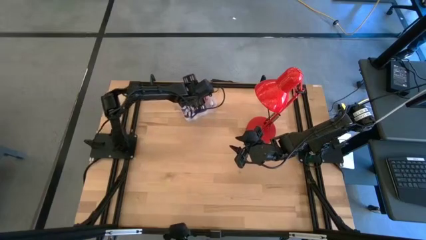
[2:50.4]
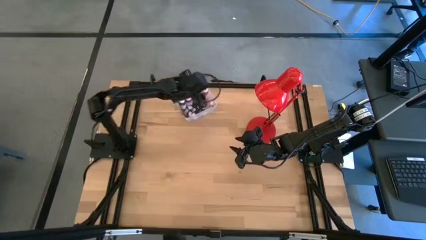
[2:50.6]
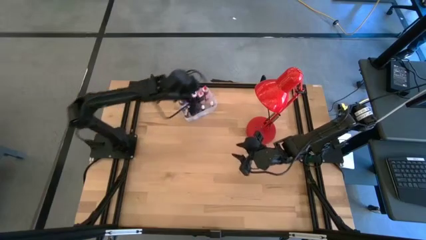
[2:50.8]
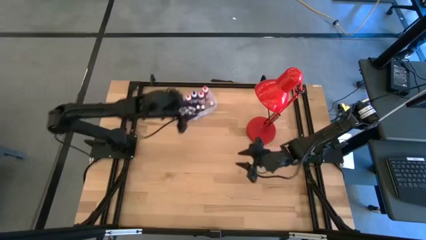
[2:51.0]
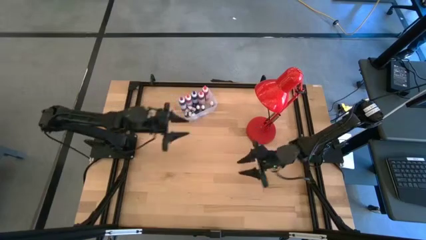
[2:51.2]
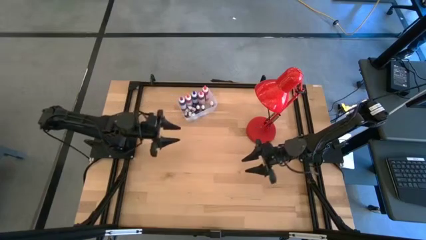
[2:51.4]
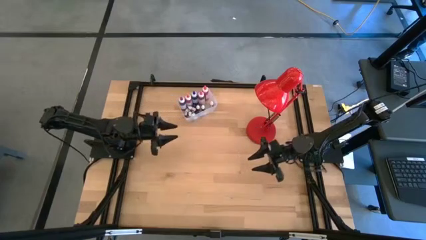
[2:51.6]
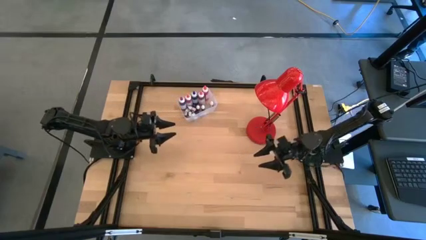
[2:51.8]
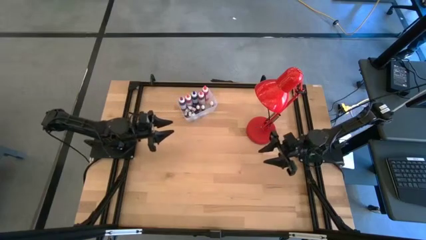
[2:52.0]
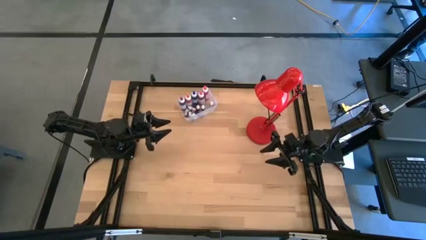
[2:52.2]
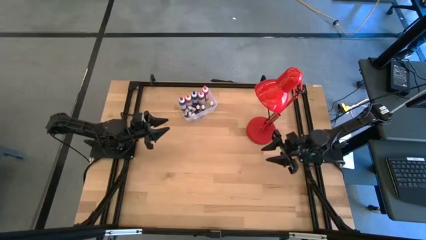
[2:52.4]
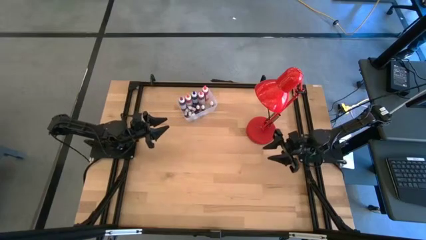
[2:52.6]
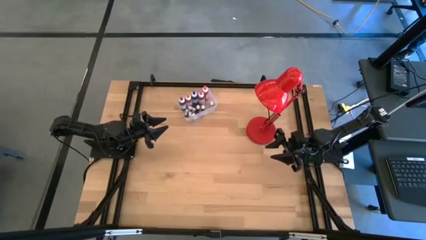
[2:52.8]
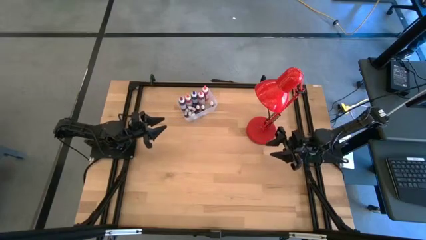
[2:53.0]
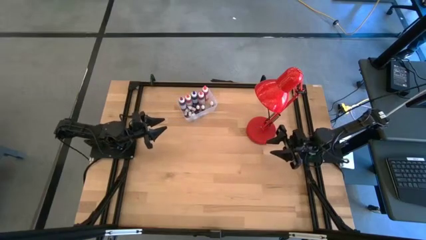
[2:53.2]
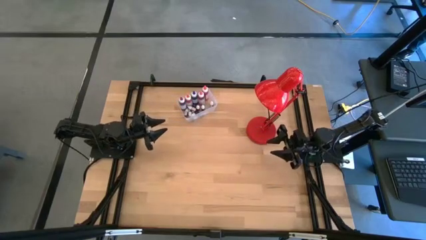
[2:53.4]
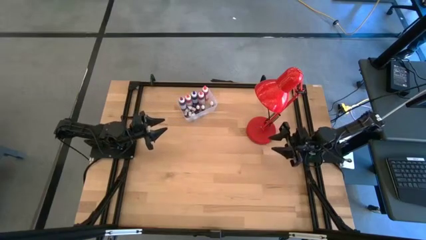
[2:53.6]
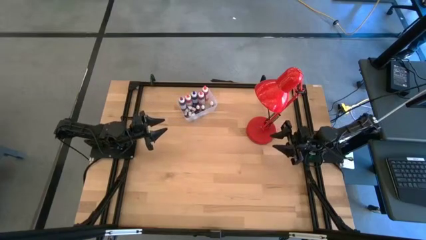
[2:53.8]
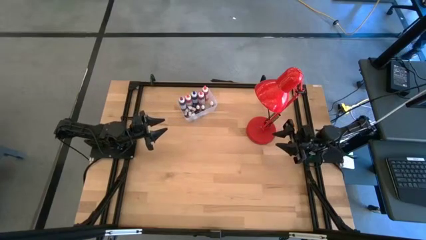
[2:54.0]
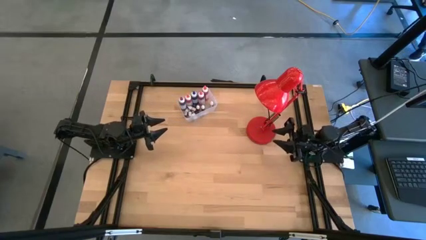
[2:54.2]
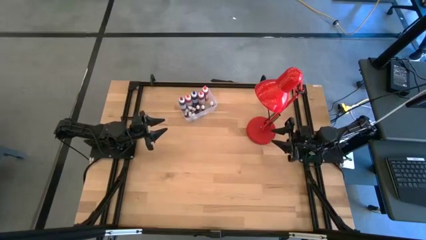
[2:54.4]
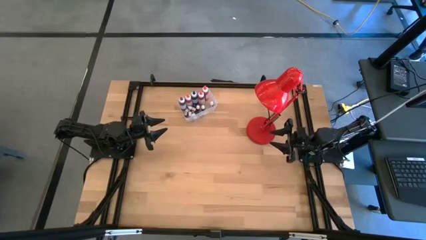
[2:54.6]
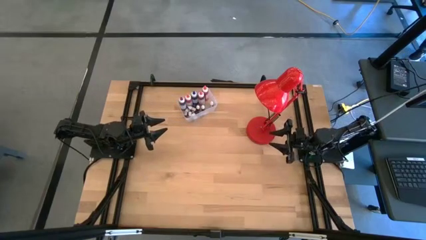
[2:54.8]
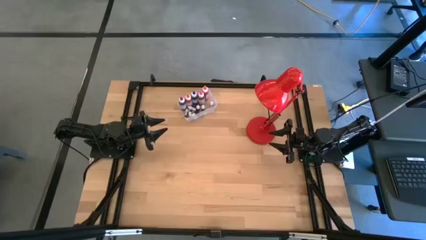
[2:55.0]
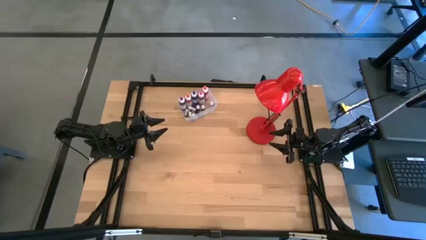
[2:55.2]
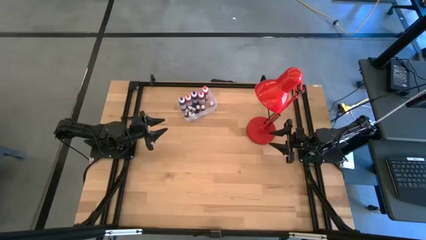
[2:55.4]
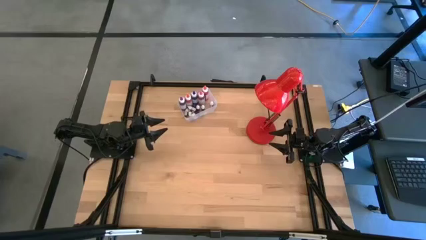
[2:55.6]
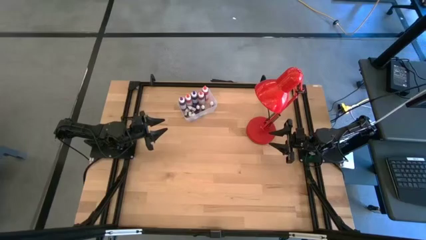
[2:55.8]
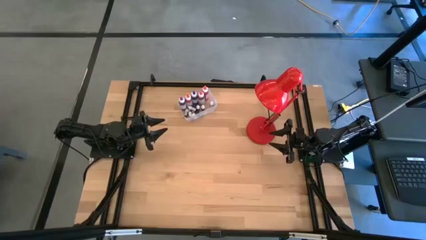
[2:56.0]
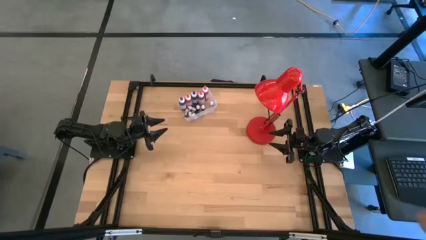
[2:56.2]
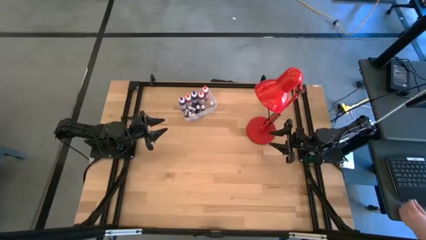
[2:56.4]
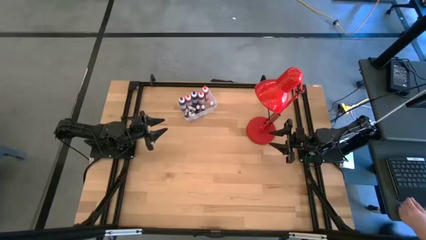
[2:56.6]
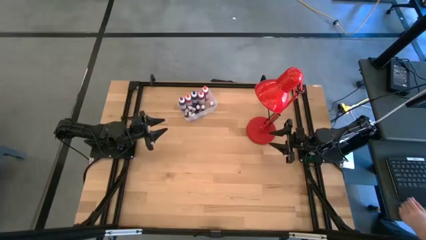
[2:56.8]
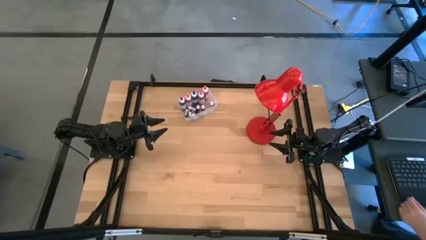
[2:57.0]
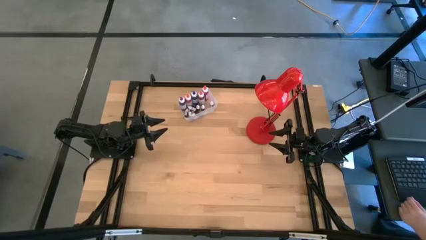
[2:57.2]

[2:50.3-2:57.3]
Task: Pick & Place food coloring
Return to Home Position

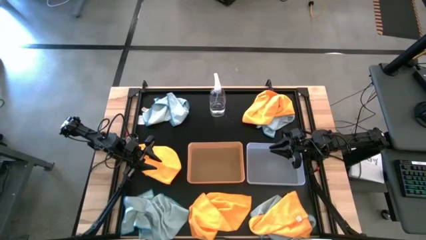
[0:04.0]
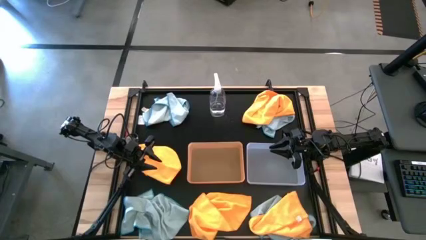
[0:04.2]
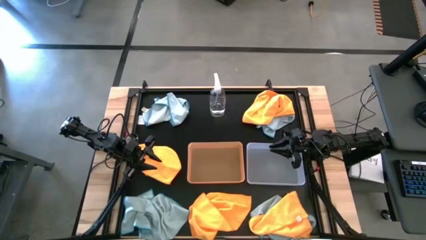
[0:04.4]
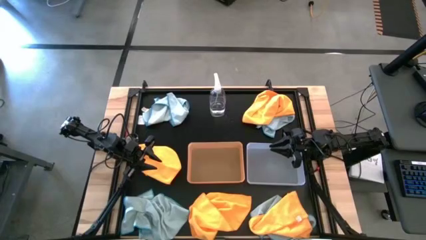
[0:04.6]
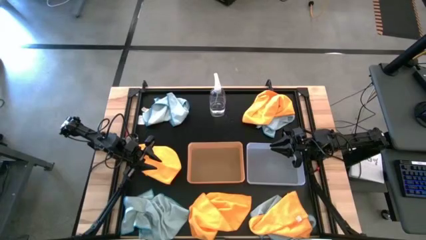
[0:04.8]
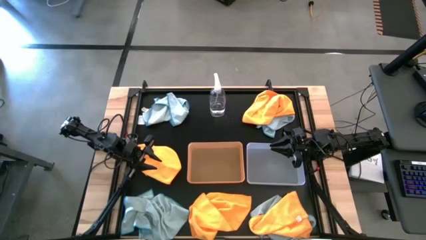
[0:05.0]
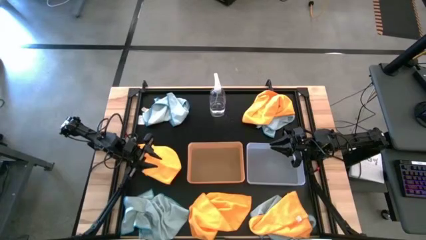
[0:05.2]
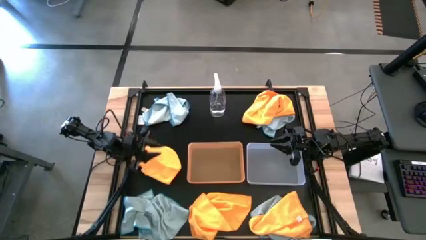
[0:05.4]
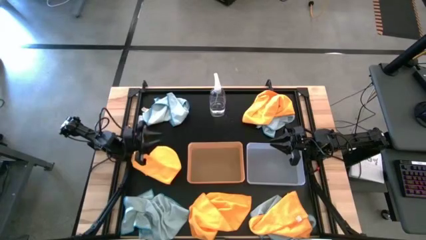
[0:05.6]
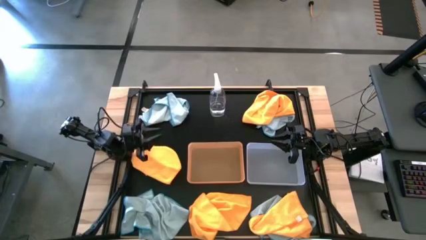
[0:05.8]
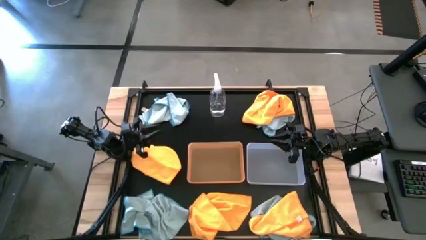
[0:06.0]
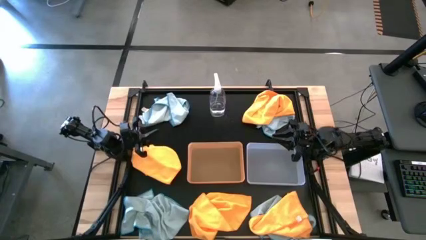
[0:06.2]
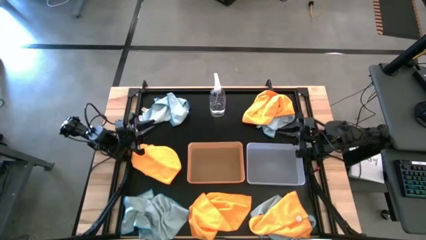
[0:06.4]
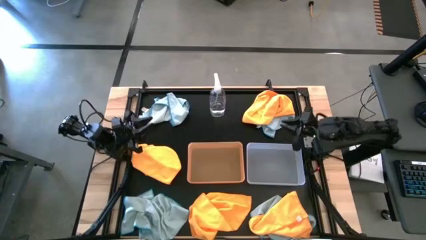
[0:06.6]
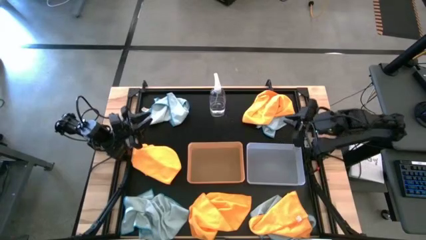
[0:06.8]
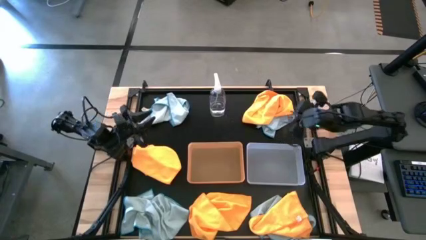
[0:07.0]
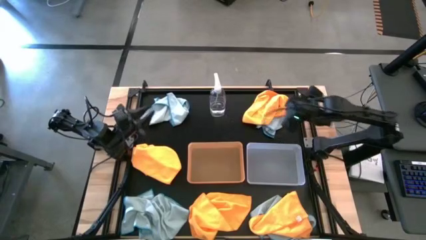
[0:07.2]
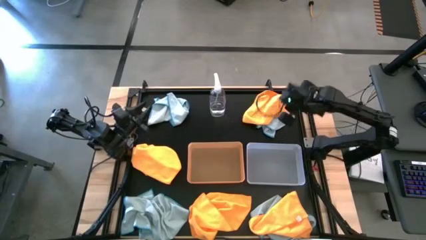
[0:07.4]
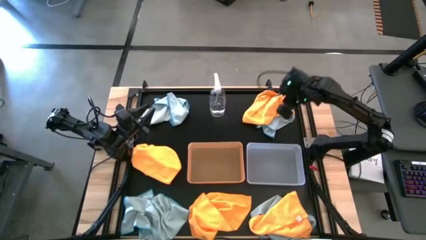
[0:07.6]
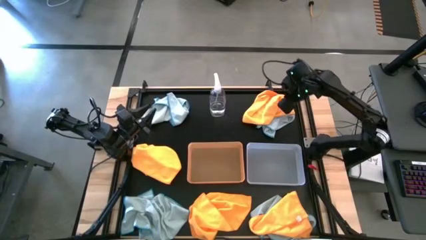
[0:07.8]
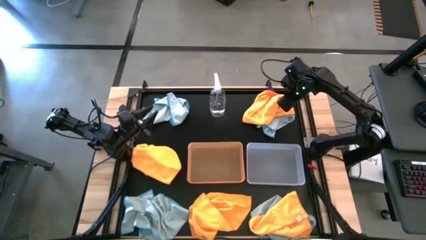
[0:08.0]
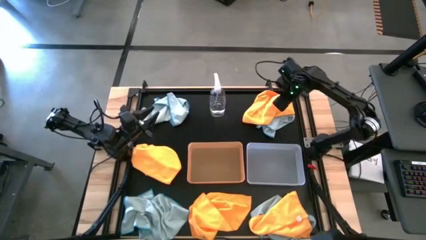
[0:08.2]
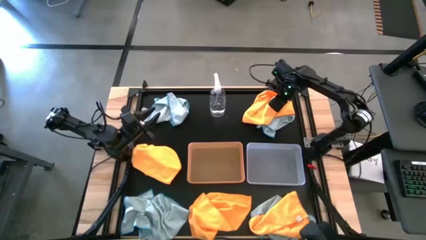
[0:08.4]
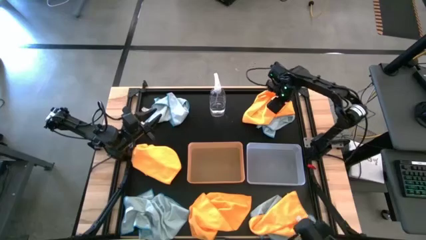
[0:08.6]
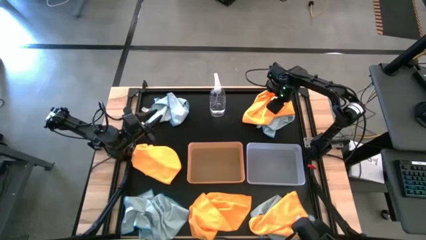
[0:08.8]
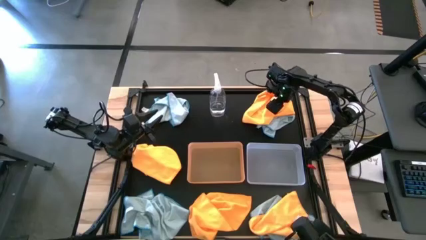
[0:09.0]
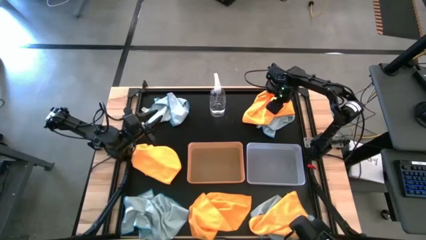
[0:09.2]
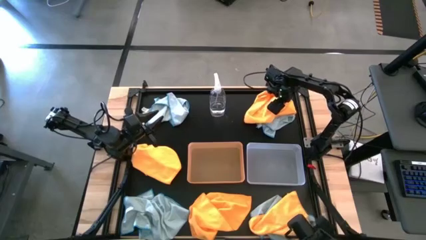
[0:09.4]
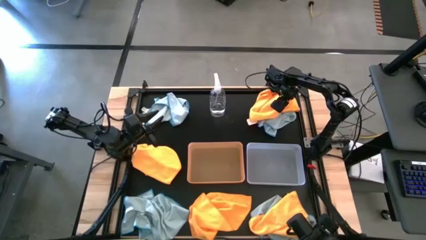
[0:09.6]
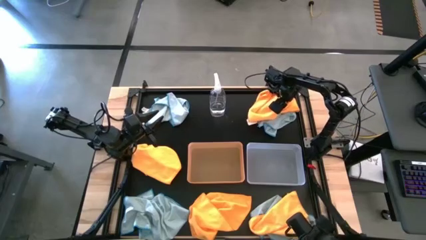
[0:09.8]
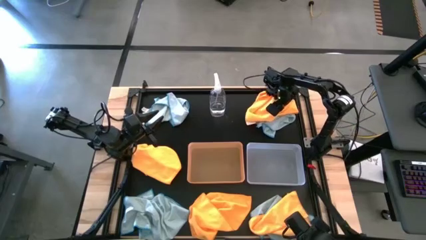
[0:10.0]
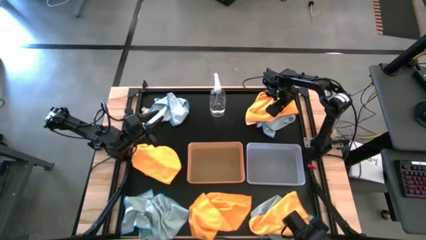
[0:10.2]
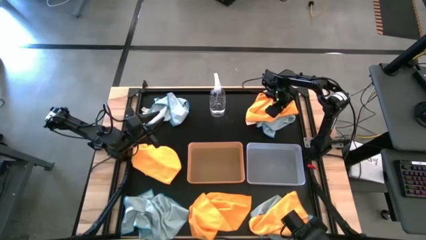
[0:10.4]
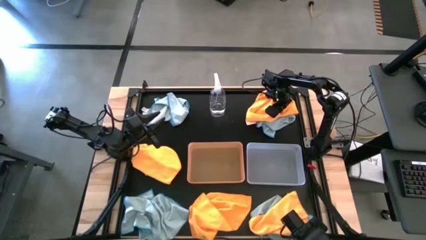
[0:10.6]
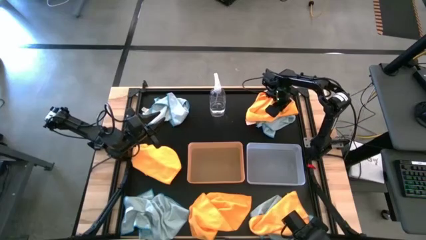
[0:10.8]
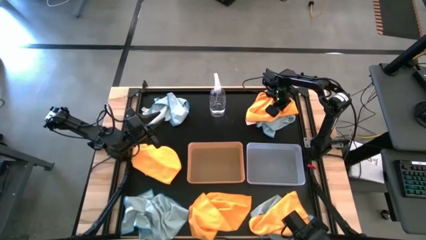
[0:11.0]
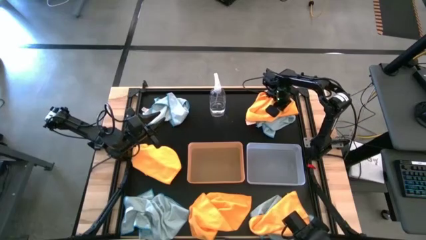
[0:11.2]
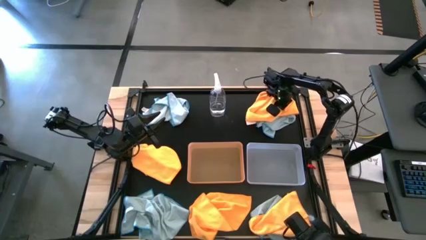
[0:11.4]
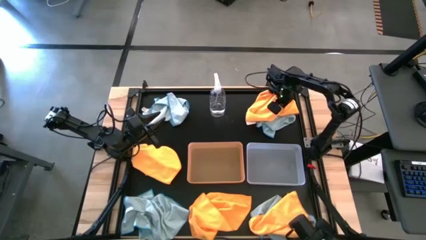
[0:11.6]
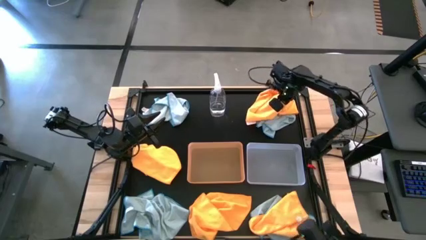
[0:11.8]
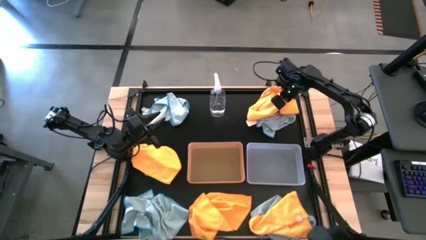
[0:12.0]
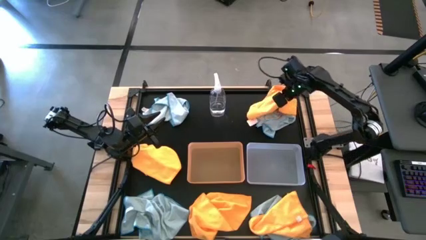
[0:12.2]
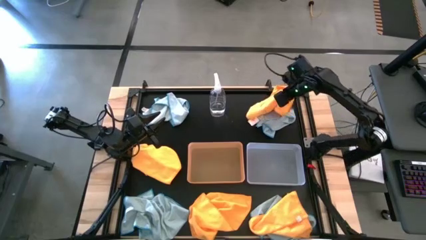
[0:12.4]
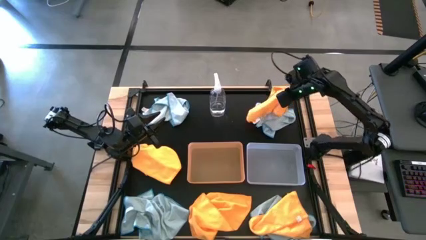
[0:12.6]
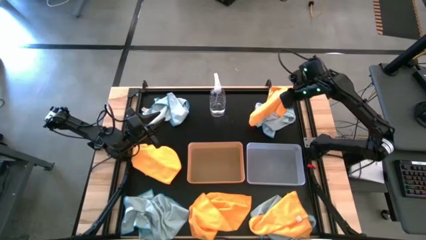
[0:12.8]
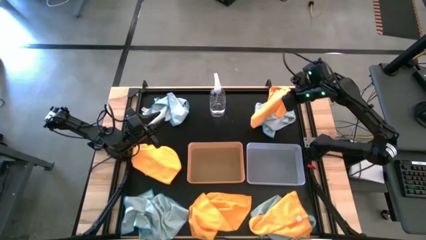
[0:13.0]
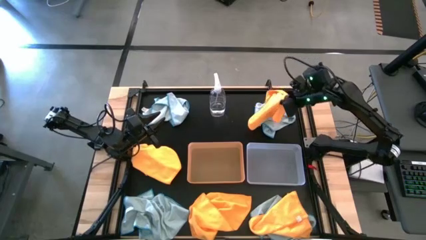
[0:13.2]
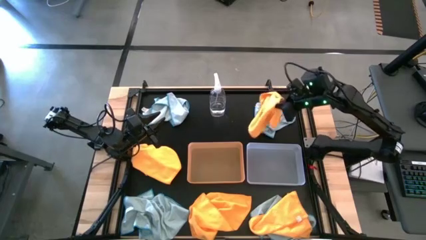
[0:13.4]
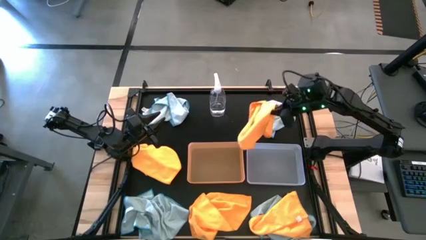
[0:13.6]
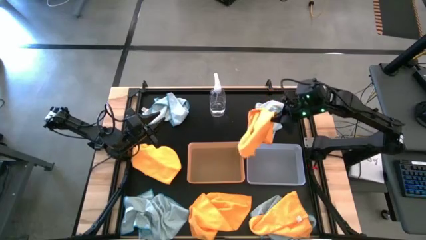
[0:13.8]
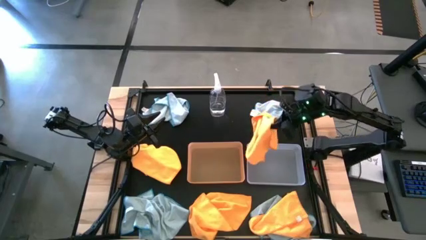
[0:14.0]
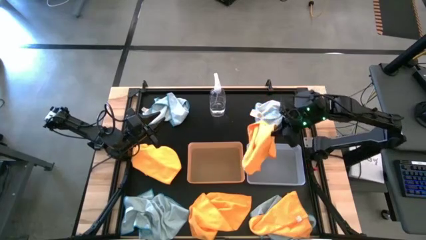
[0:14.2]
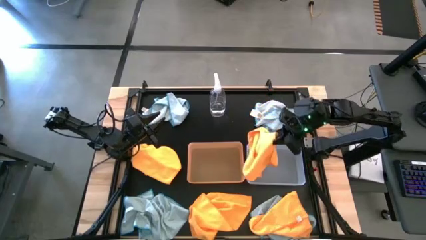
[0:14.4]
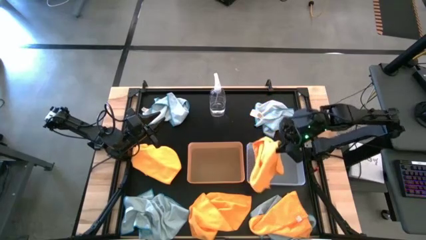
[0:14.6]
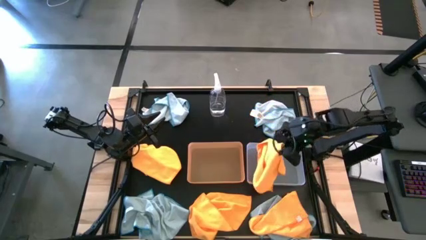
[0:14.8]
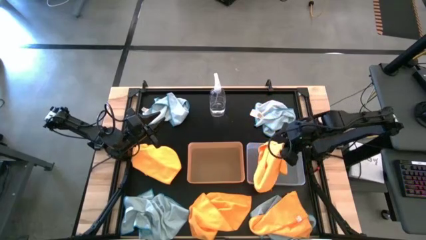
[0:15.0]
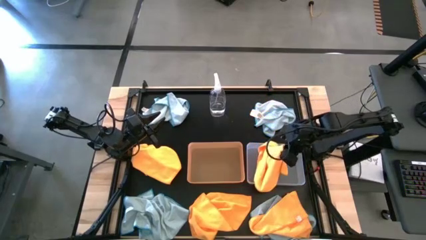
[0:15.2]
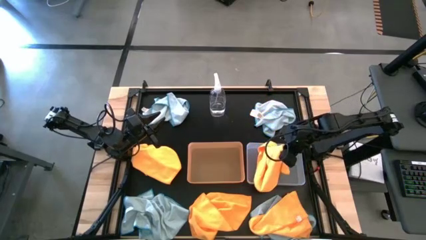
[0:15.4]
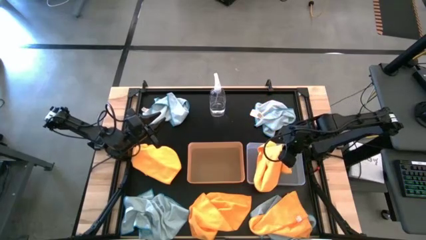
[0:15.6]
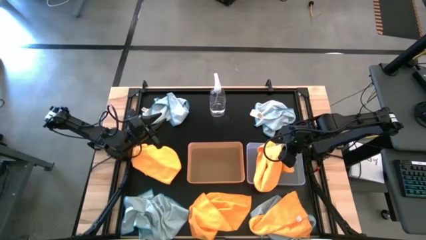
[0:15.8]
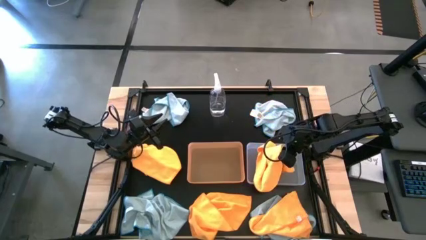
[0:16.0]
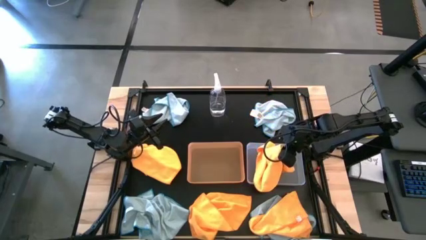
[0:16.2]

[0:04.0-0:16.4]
Task: Sort microfiber towel by color & place in baskets
Put the orange towel into the transparent bin
